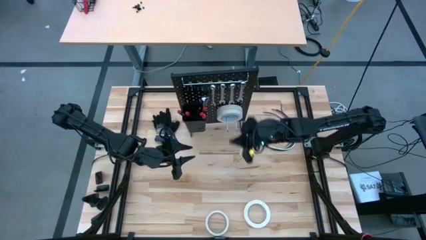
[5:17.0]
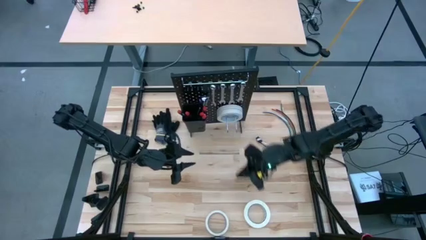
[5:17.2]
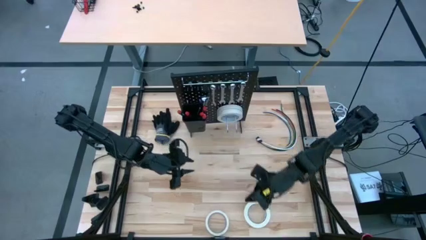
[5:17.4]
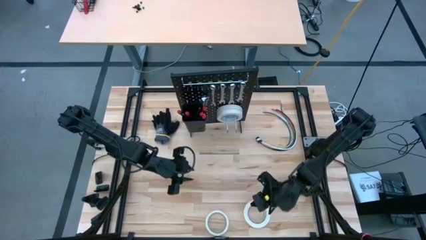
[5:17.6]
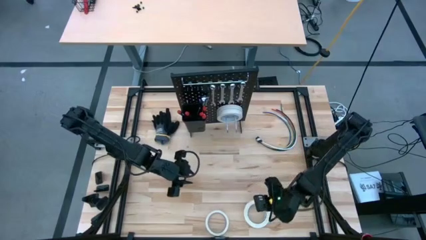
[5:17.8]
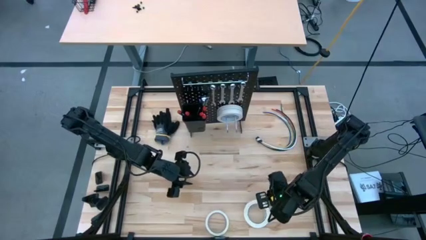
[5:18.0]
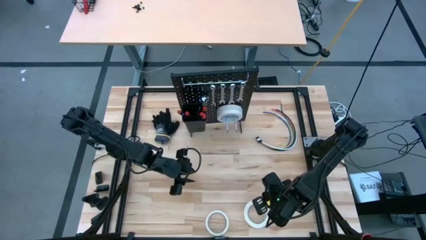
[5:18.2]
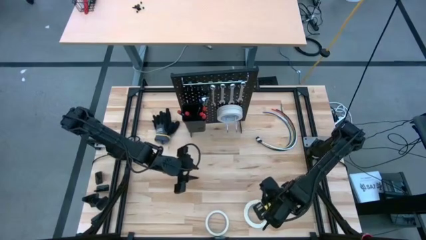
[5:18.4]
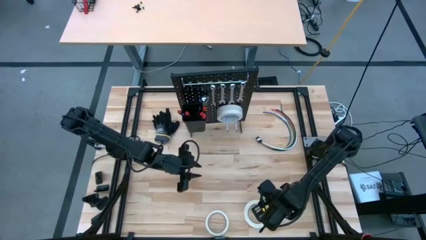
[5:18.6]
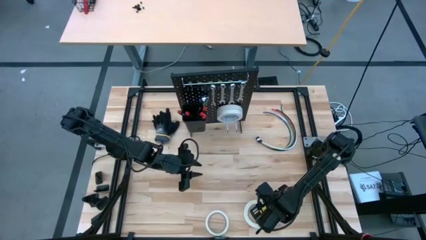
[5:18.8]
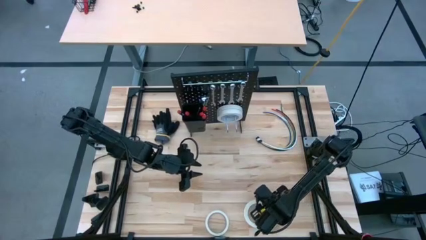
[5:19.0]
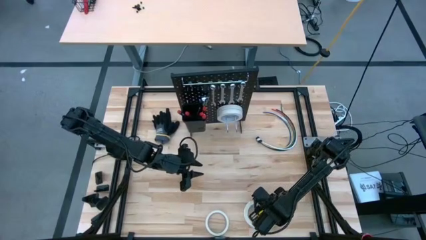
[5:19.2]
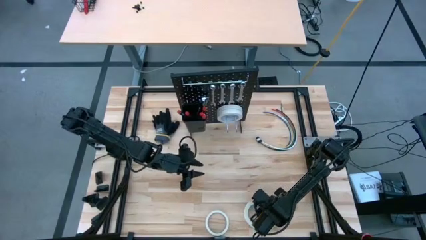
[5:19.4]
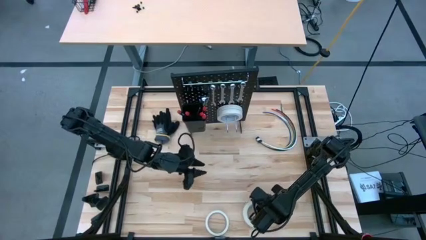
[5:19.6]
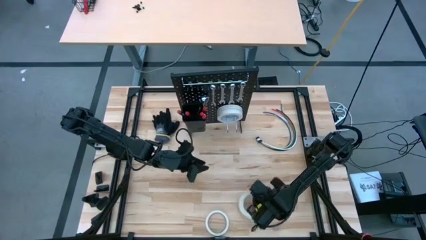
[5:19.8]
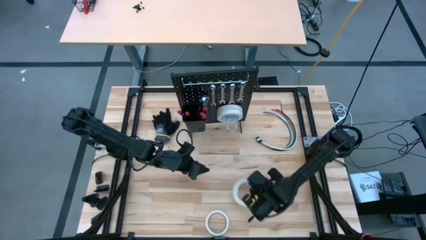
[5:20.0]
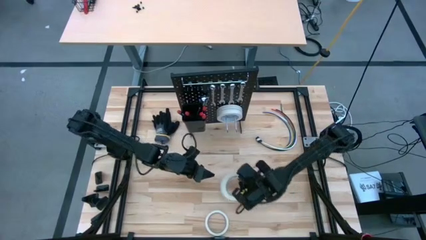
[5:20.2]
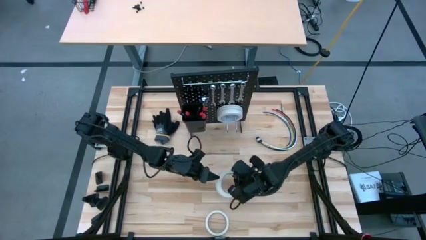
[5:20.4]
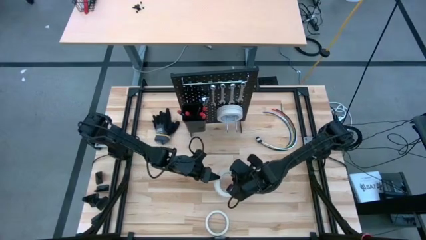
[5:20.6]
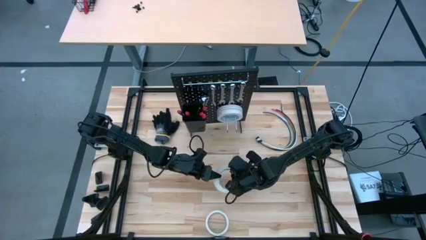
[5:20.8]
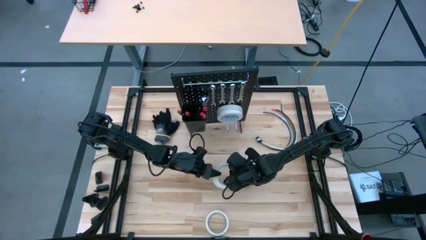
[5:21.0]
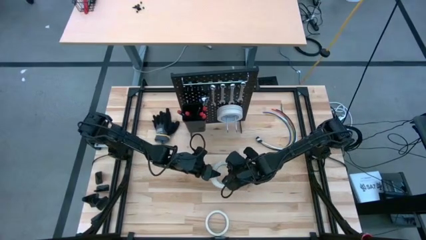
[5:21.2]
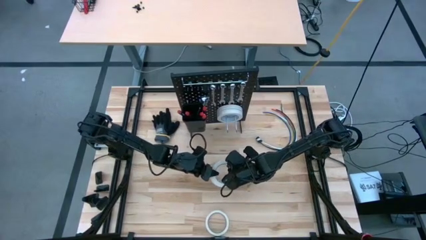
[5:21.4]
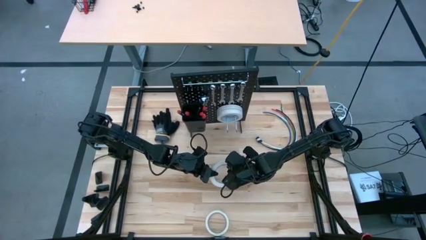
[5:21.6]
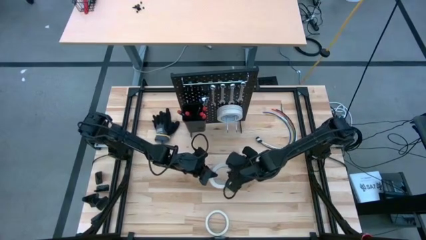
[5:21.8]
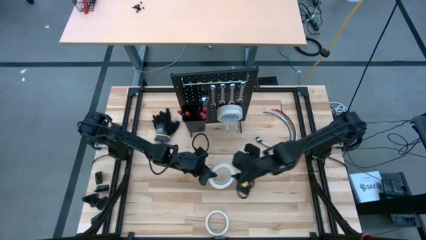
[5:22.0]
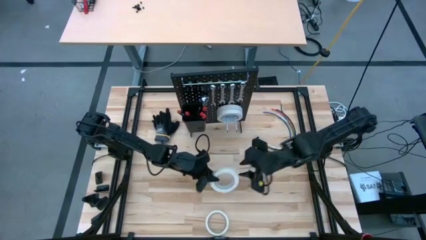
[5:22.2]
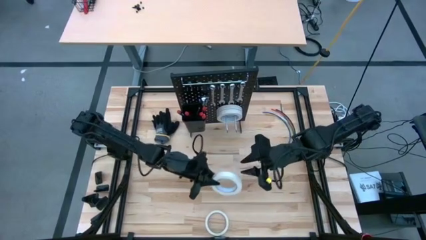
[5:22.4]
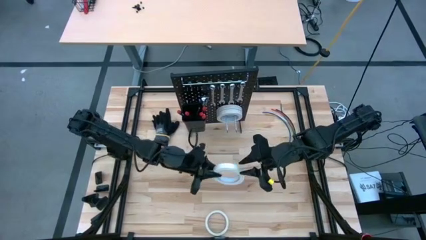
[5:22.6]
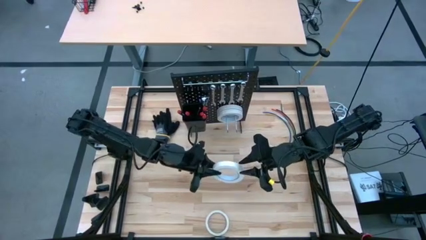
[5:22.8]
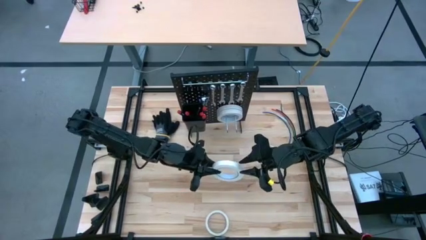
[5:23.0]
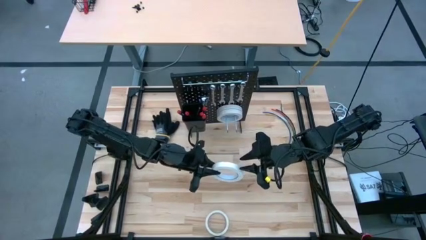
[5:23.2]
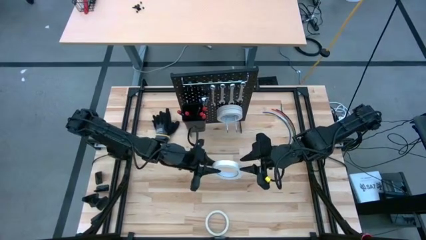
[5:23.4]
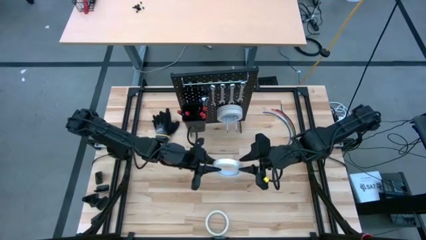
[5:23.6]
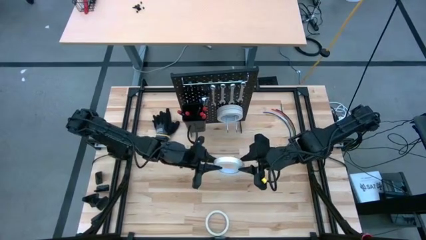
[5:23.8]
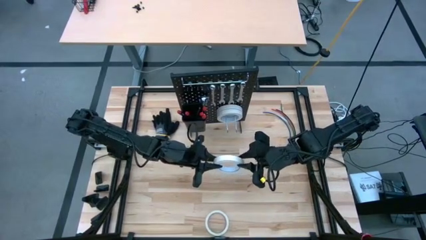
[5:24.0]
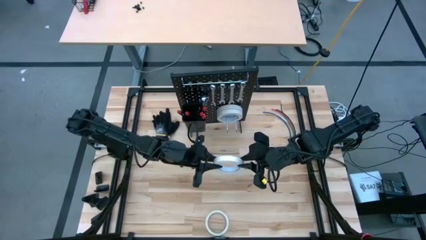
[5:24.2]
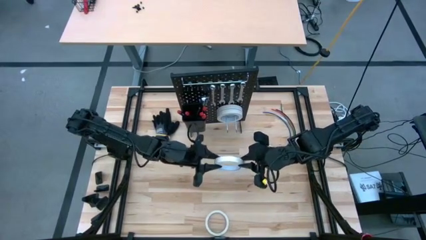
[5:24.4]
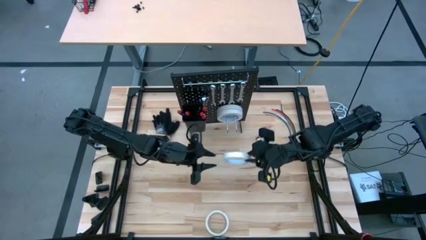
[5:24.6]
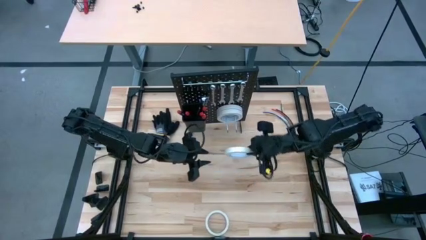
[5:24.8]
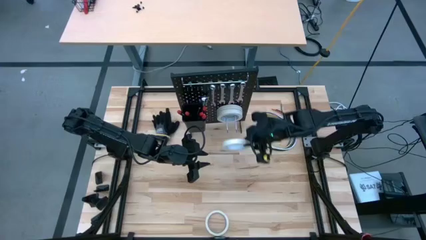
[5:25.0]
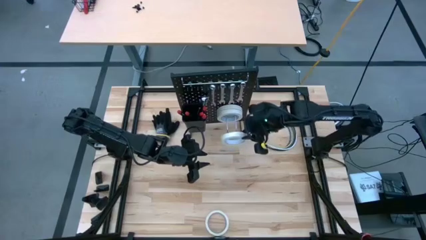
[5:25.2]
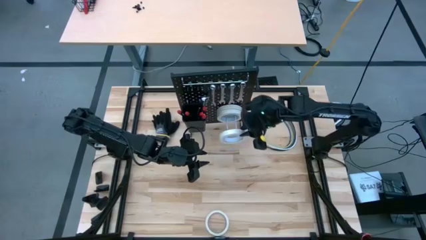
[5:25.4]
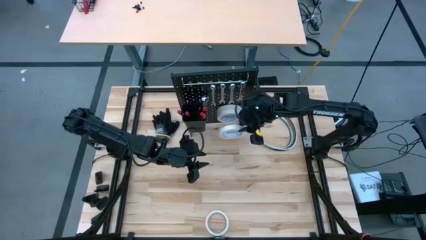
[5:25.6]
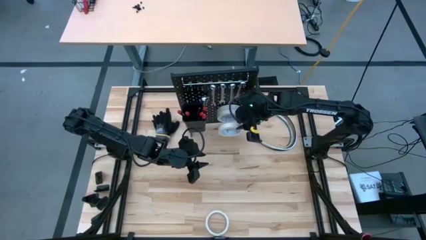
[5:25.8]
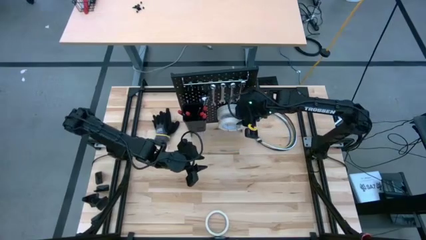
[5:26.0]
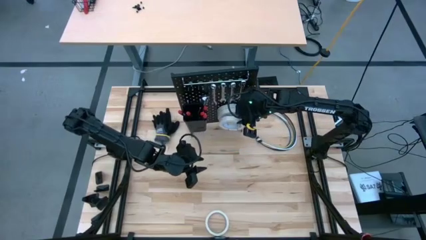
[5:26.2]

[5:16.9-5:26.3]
Task: Hang tools onto peg board
Hang the white masking tape on the peg board

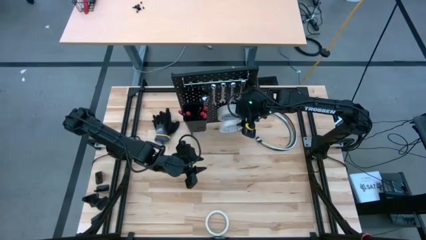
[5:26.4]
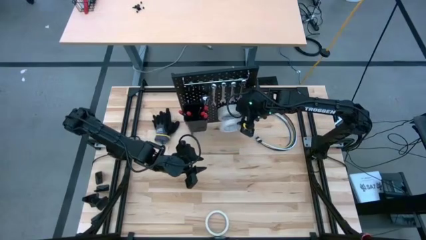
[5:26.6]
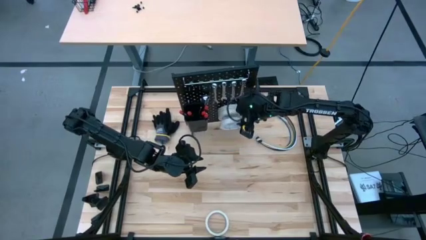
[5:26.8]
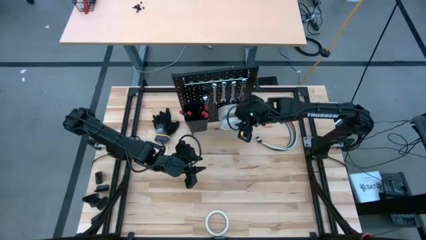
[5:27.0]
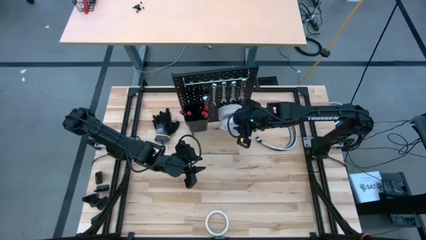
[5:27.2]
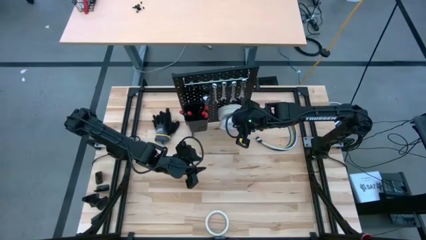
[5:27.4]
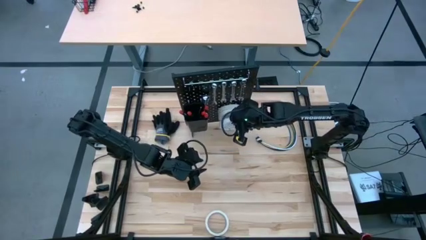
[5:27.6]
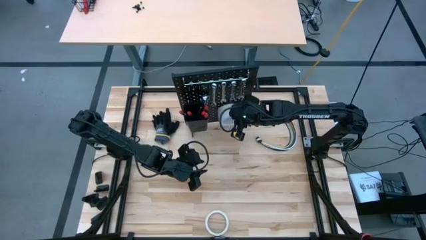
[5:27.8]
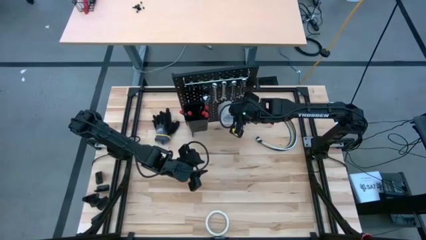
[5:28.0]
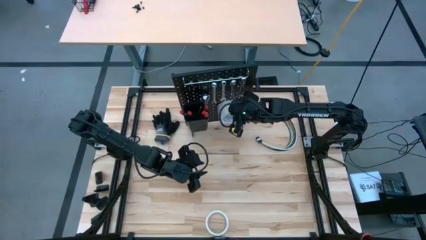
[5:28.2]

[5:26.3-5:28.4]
Hang the white masking tape on the peg board

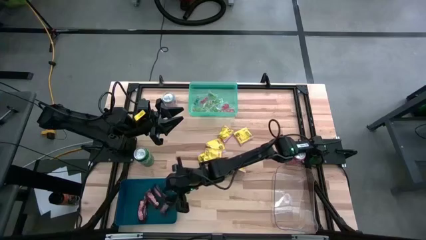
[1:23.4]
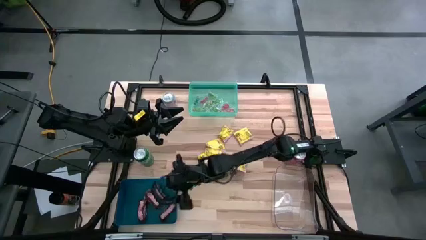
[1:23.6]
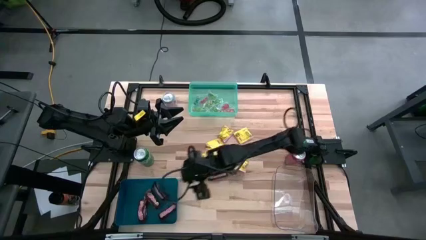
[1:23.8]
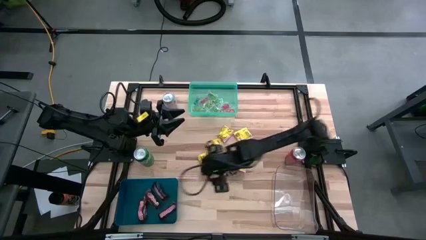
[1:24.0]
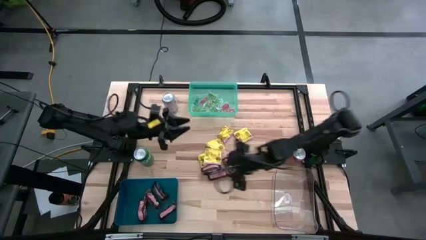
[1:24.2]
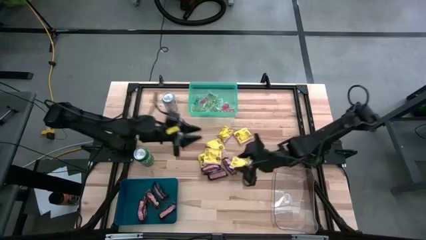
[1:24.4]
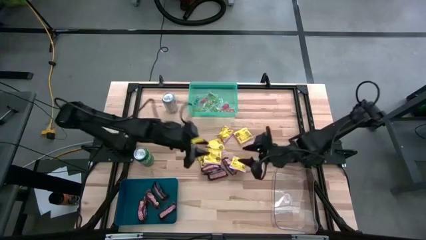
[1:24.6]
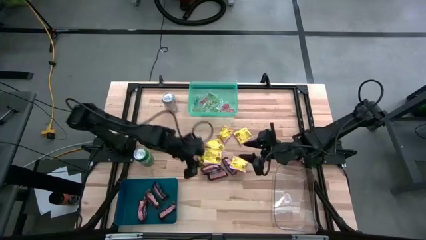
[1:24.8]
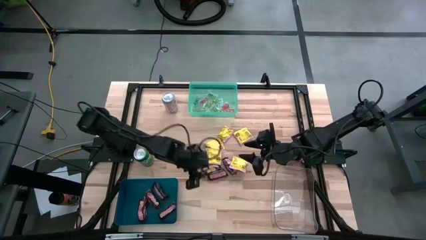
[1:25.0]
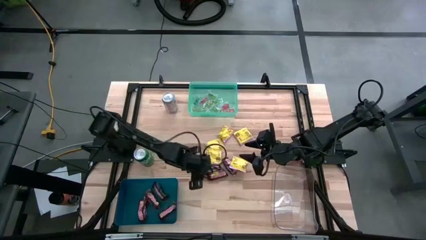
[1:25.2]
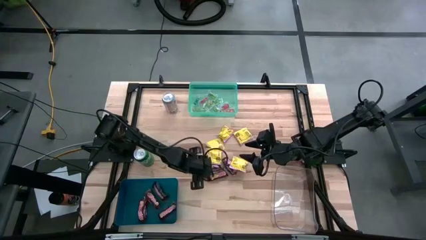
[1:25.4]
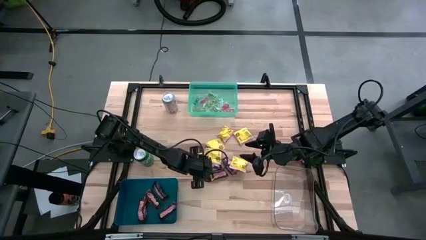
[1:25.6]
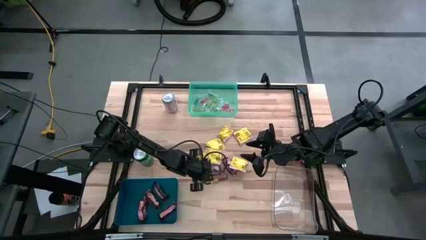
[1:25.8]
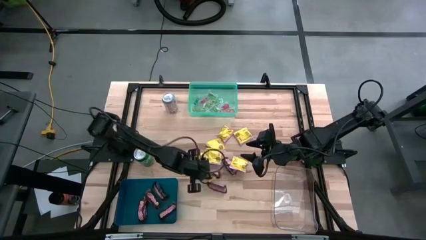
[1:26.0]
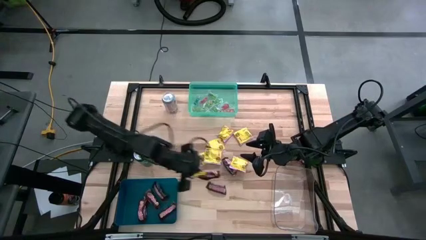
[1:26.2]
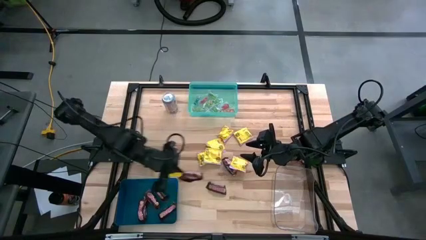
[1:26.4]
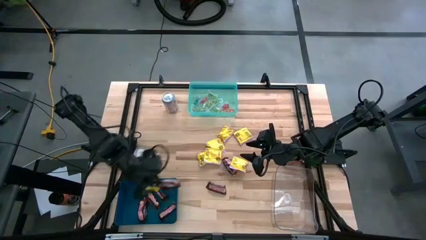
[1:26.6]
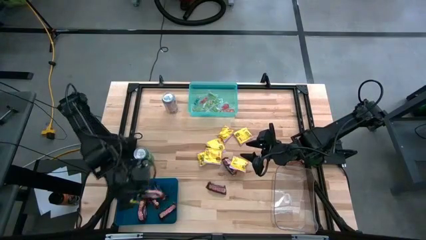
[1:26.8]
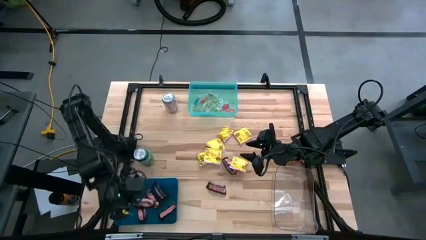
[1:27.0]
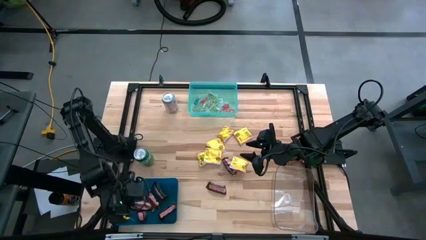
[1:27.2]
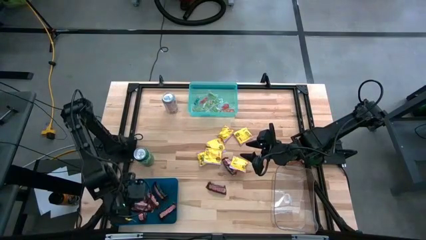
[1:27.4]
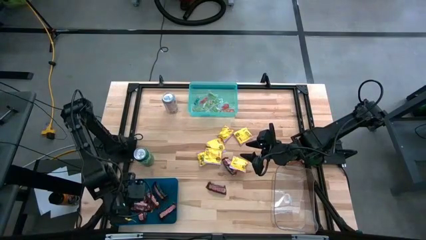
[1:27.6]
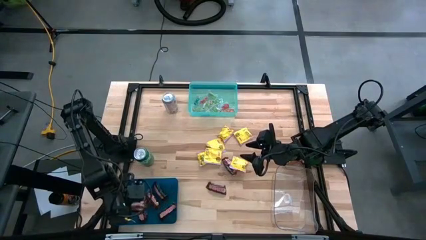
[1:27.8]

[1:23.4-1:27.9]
Task: Sort candy
Put the brown chocolate into the dark blue bin
